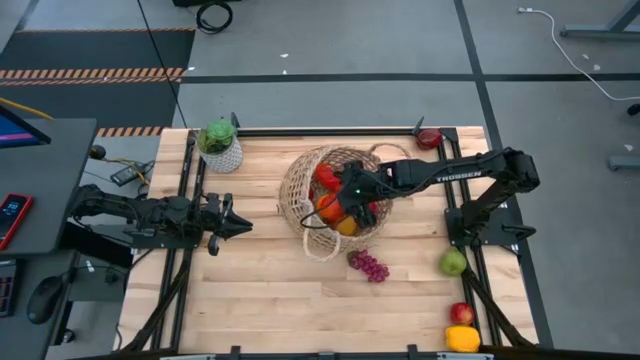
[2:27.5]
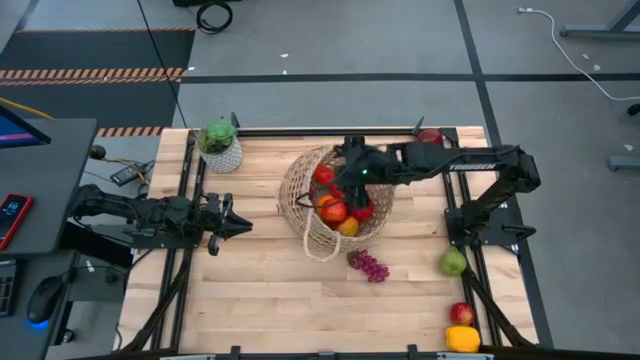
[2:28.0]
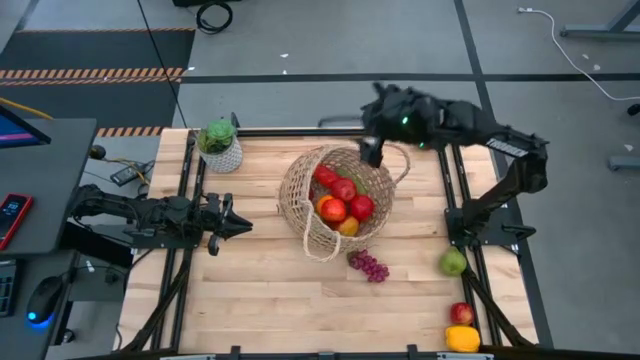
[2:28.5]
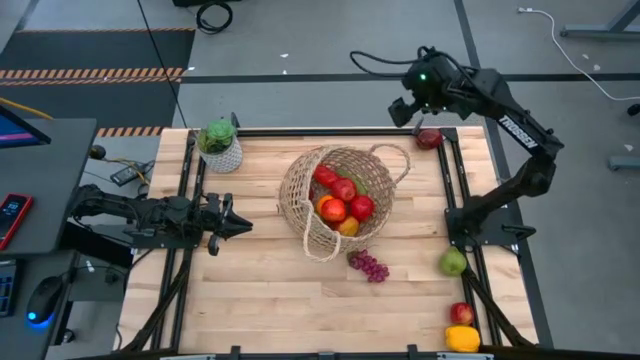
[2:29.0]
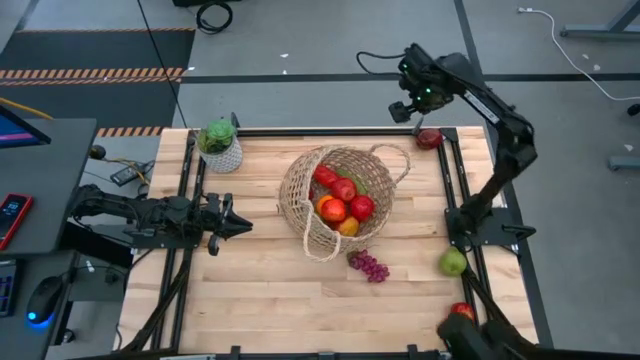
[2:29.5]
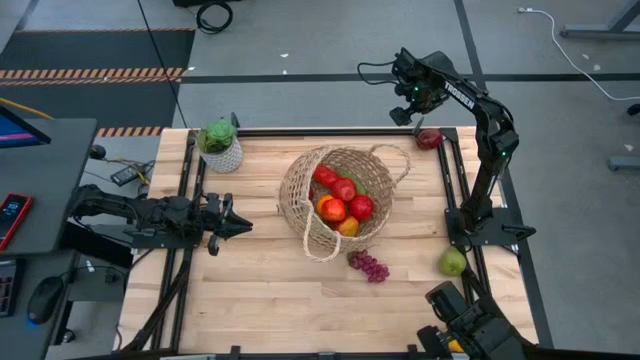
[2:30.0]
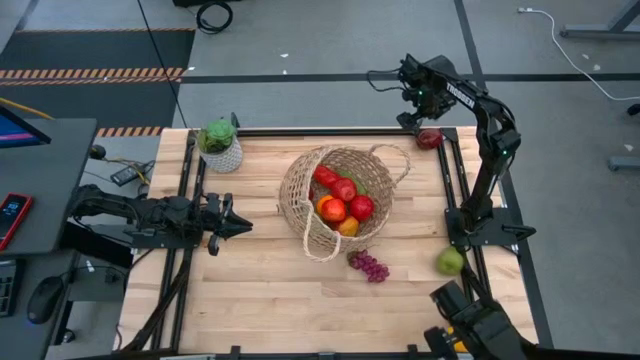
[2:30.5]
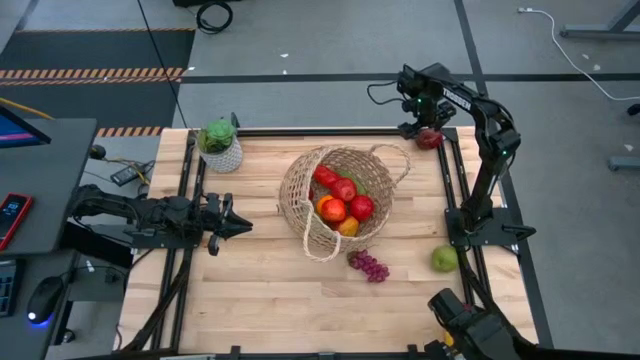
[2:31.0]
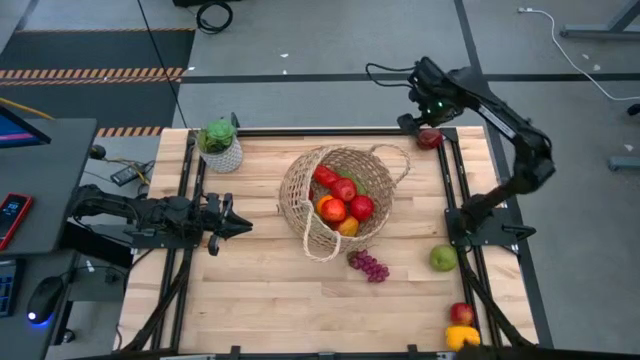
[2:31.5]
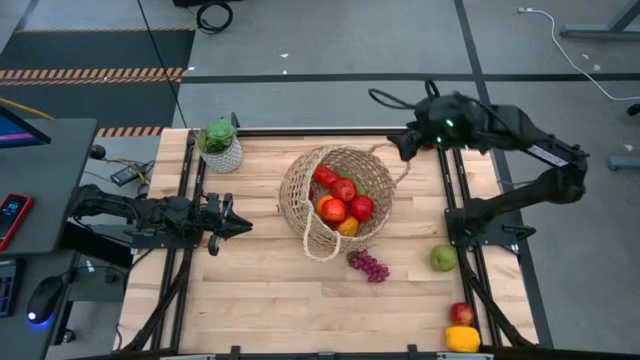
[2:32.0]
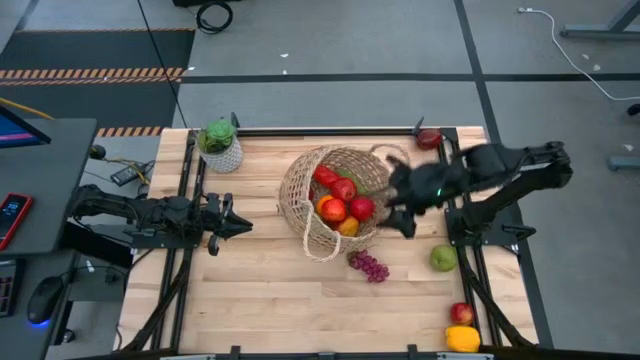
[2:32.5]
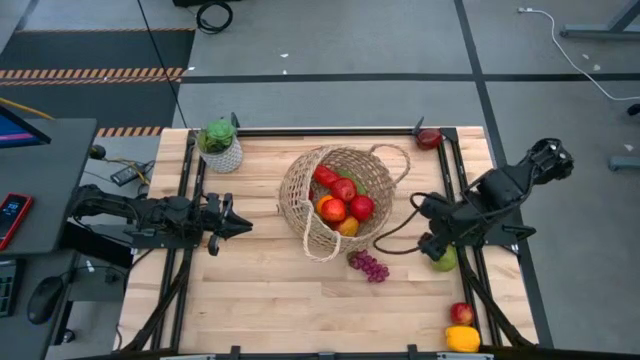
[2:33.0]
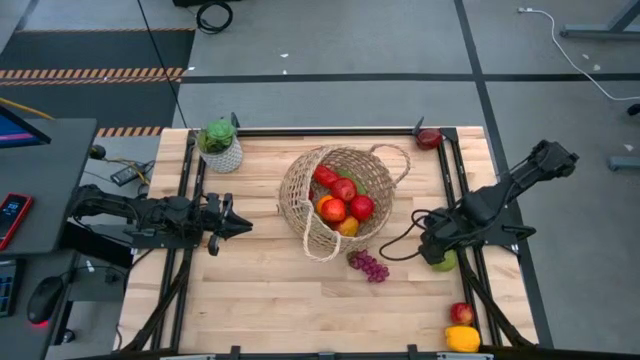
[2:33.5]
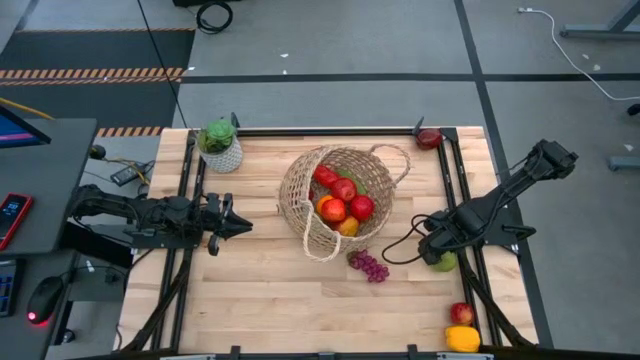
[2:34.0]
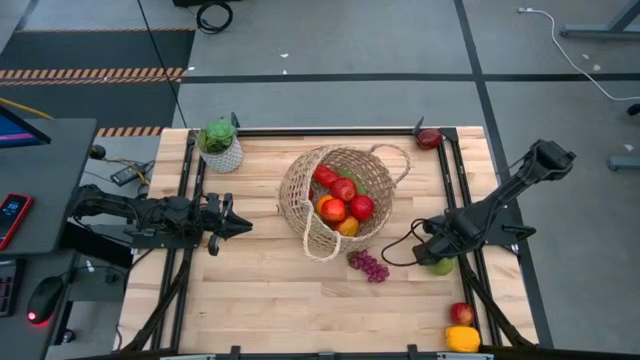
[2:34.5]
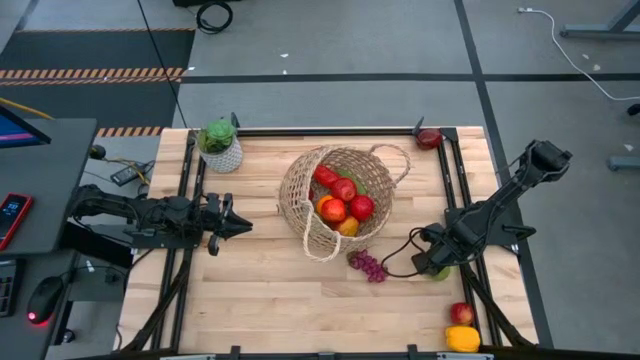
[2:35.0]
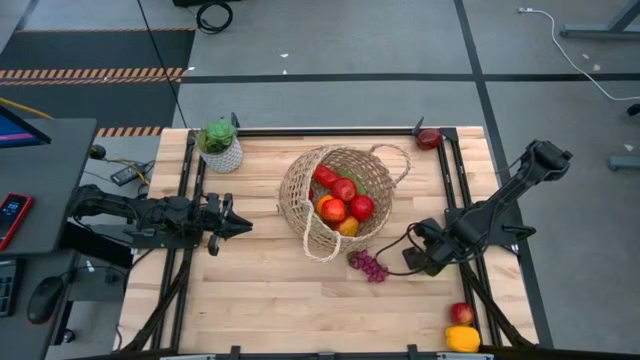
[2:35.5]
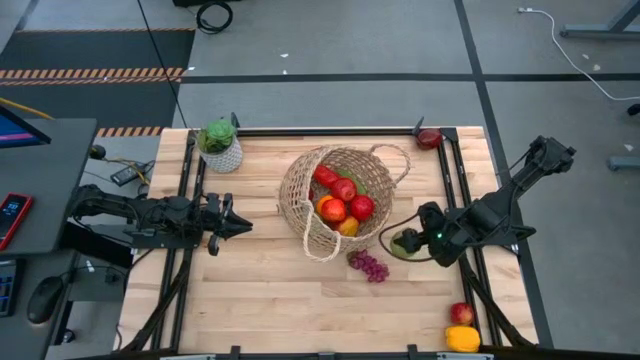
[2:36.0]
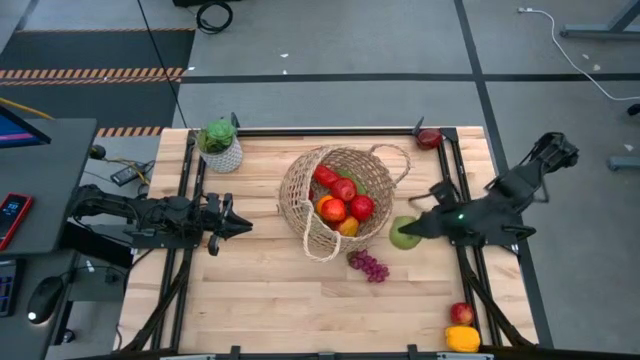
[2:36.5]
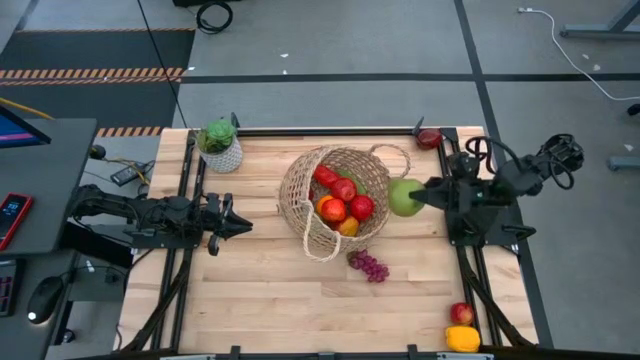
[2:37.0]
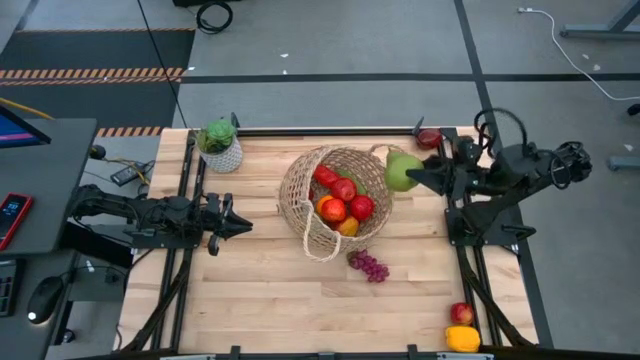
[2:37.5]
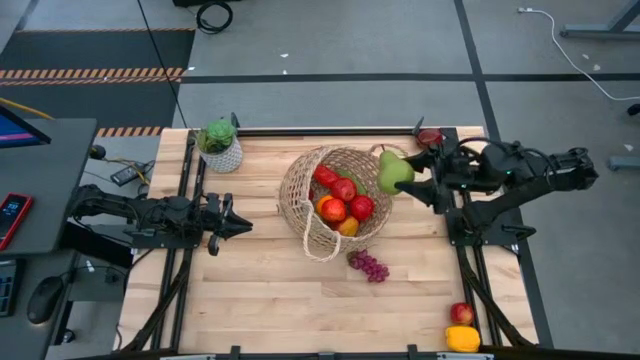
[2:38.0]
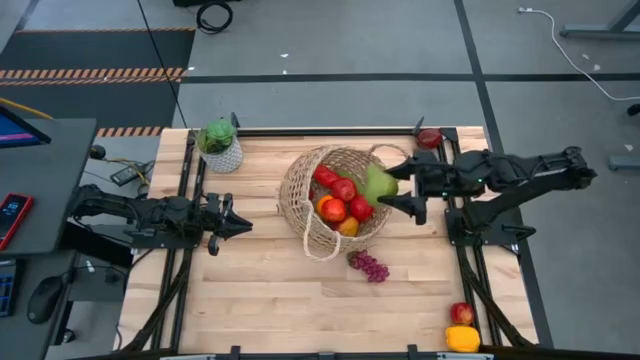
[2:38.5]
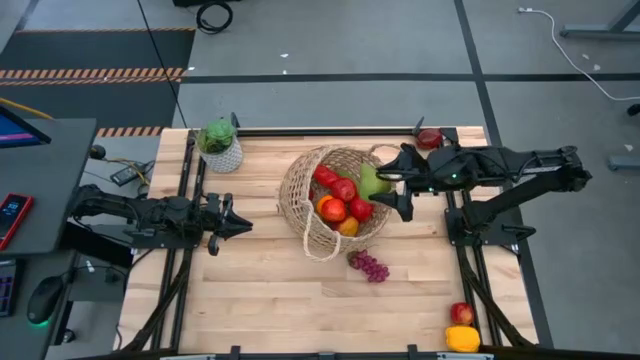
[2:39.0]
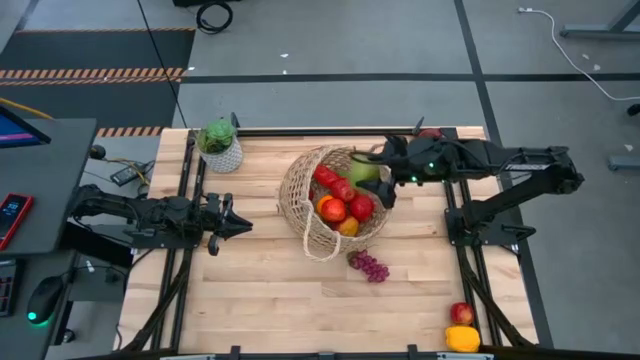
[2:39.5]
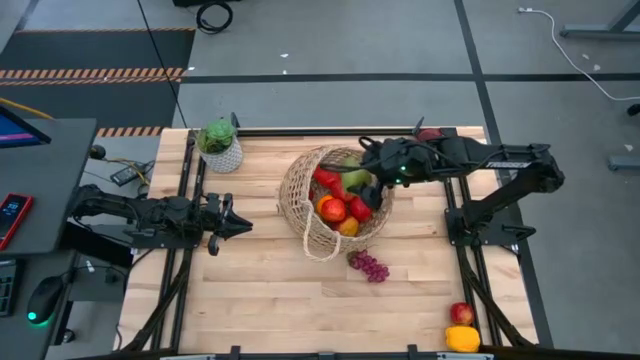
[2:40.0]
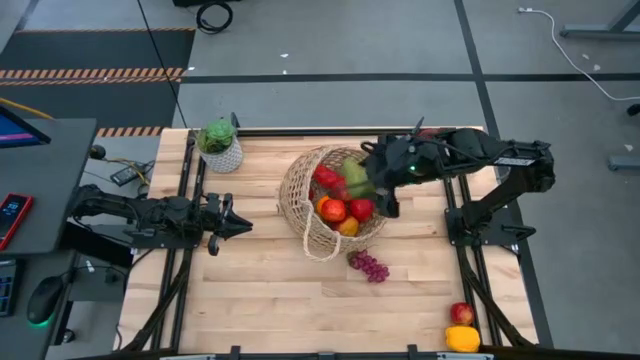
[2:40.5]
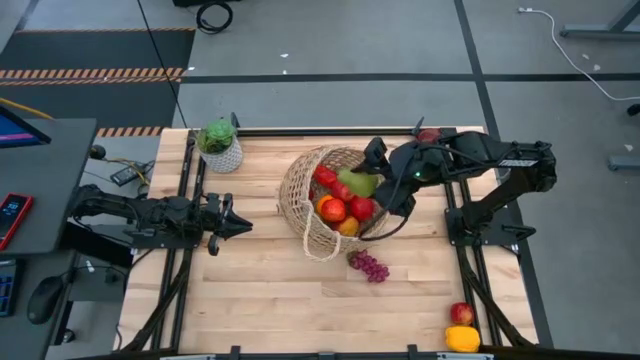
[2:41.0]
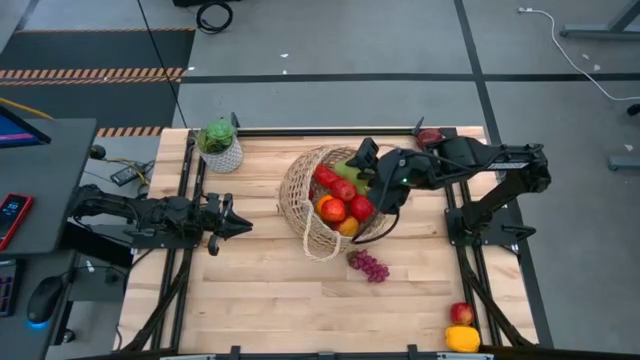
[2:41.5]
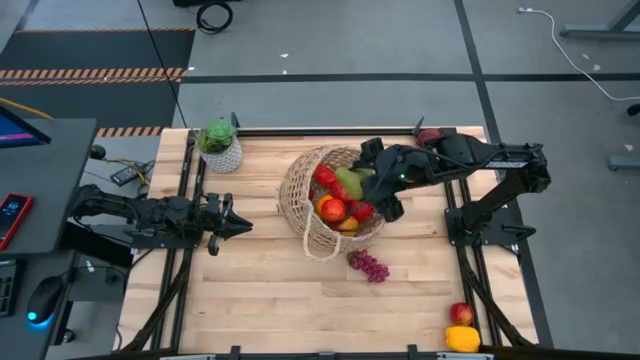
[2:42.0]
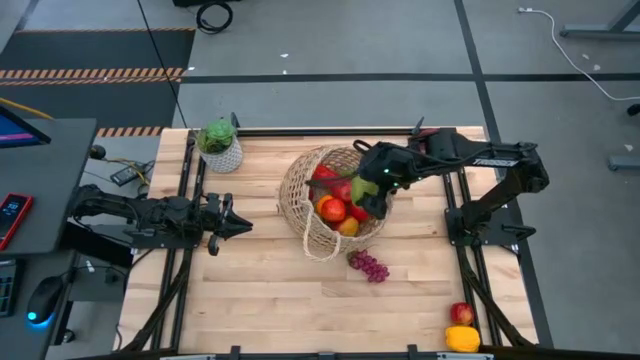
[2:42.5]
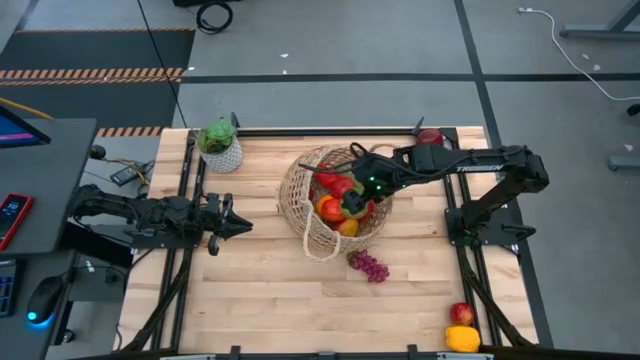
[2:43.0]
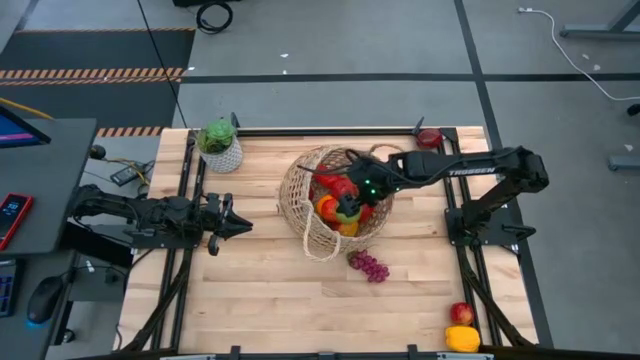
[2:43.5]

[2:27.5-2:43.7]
Task: Build produce basket
Put the green pear into the woven basket

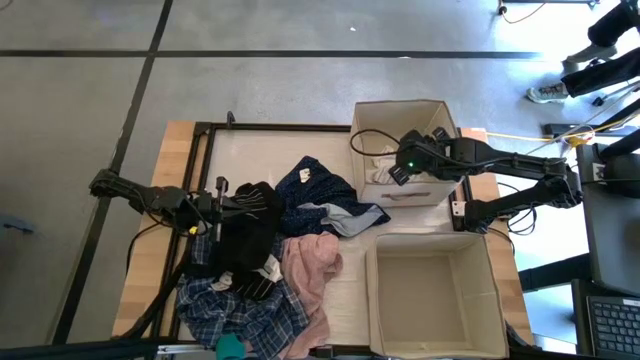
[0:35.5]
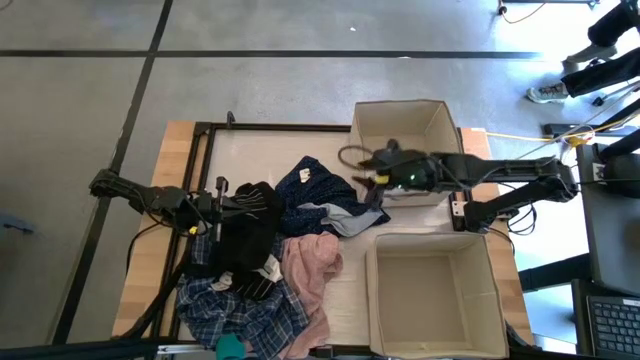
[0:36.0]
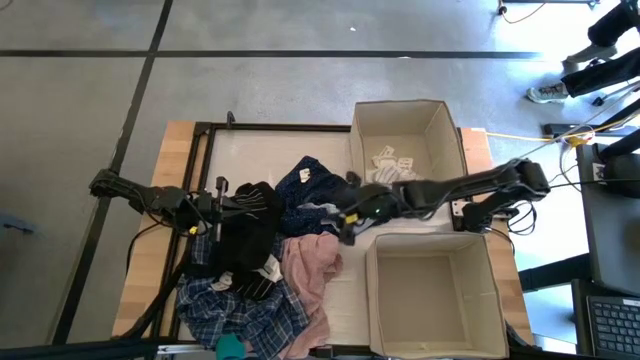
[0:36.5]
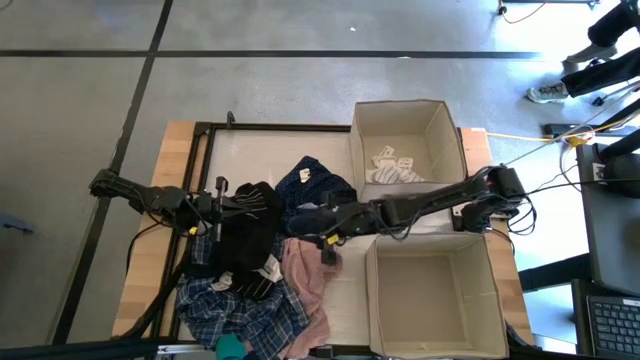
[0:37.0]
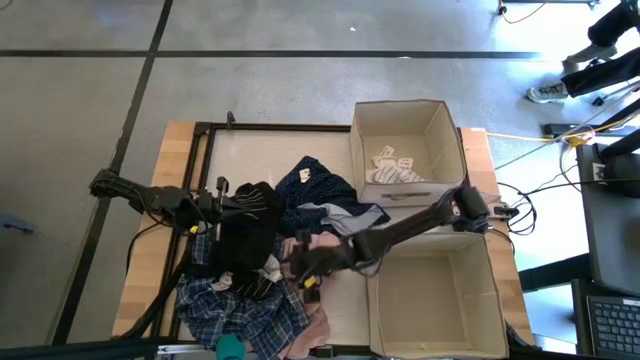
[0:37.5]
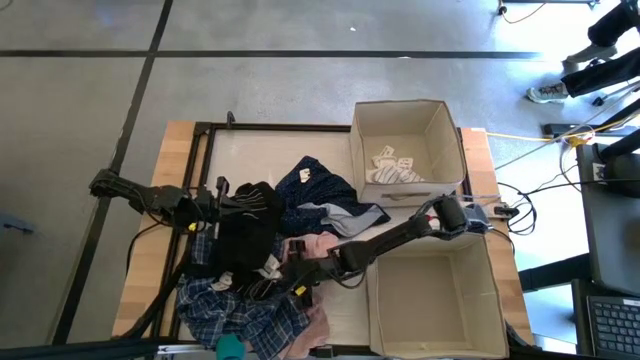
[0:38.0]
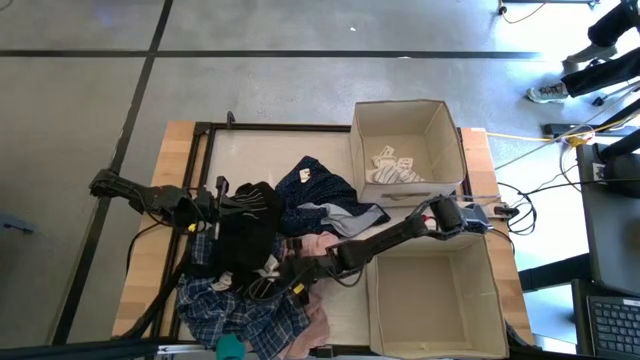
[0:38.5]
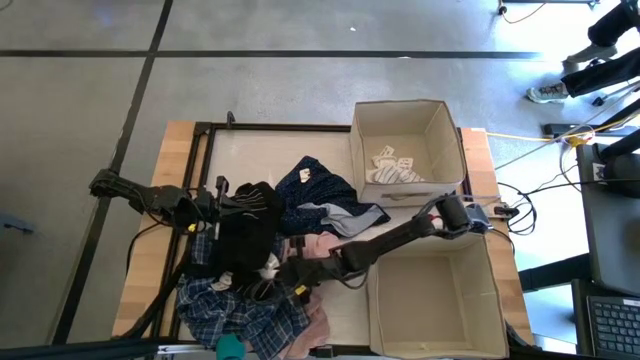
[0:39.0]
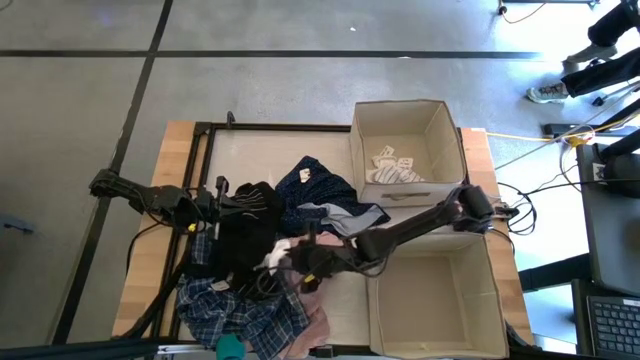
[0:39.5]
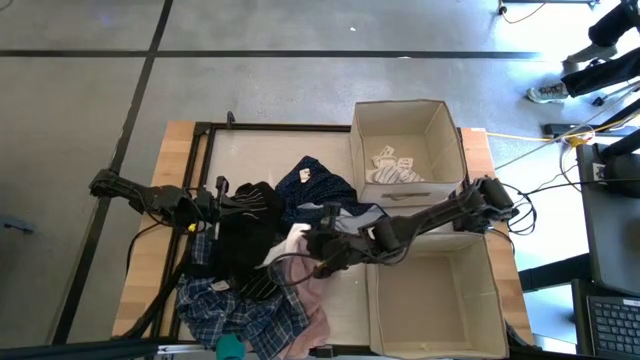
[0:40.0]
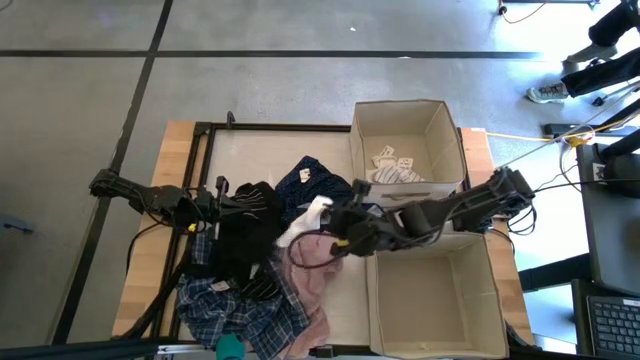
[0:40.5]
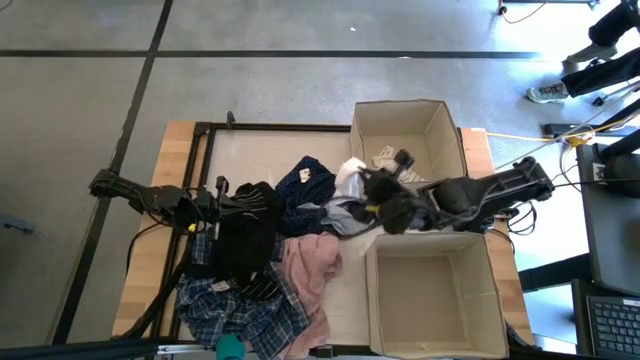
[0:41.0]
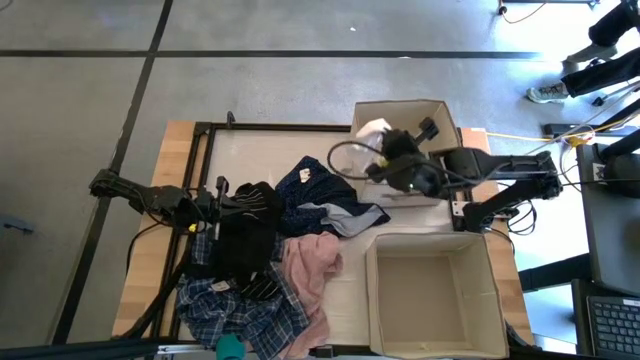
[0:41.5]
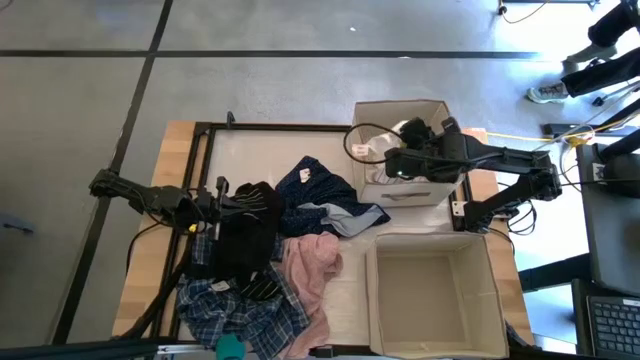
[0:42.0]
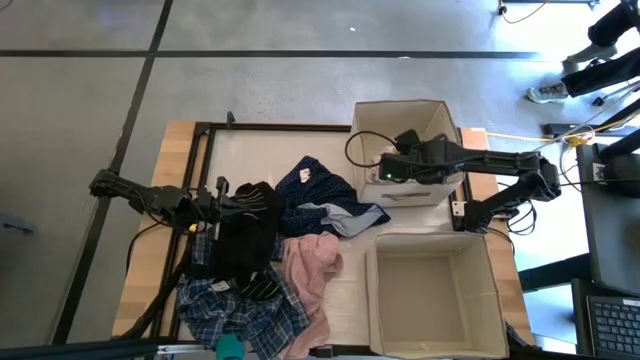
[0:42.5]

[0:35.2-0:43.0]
Task: Sort clothes
Put the white sock into the top laundry organizer
